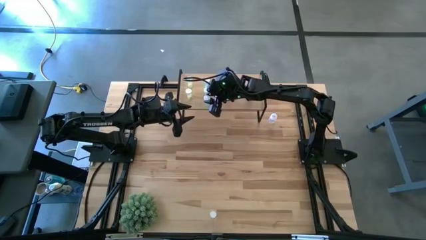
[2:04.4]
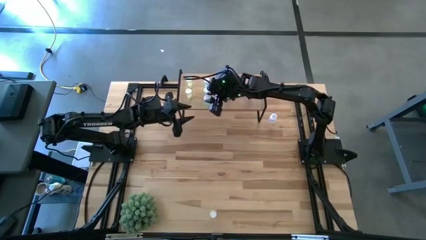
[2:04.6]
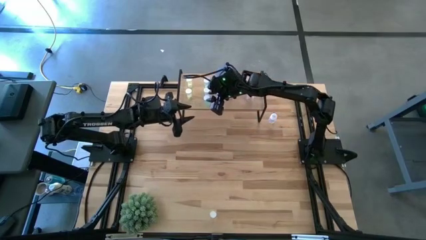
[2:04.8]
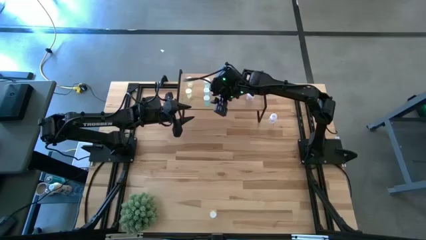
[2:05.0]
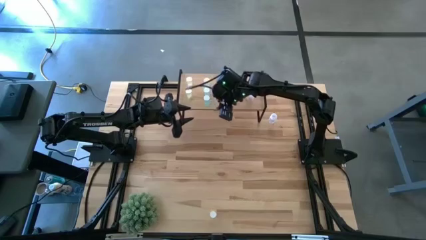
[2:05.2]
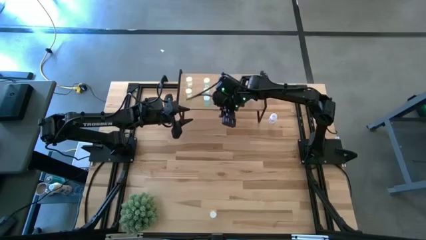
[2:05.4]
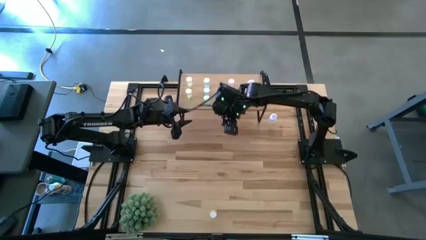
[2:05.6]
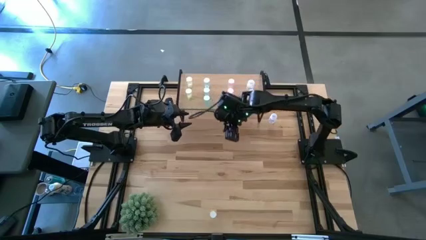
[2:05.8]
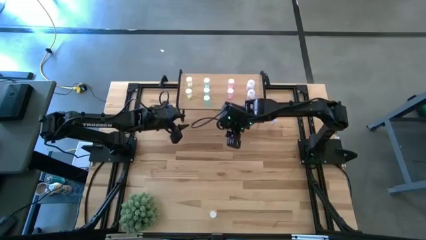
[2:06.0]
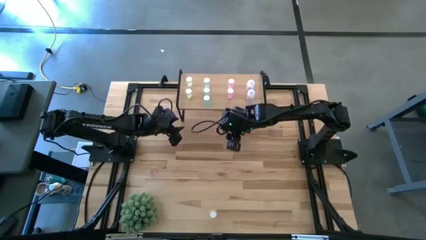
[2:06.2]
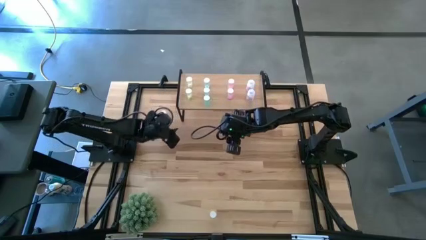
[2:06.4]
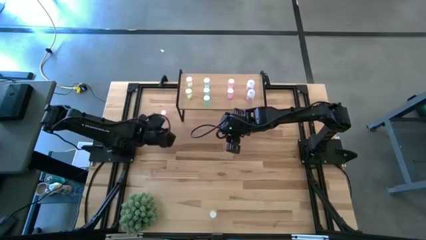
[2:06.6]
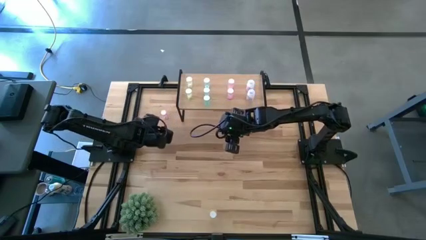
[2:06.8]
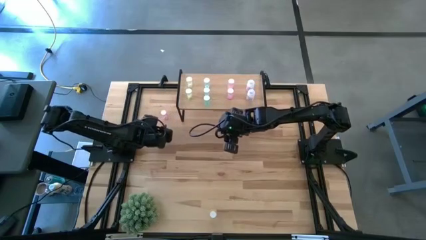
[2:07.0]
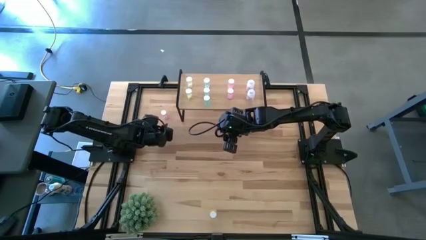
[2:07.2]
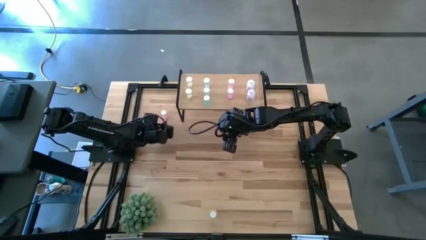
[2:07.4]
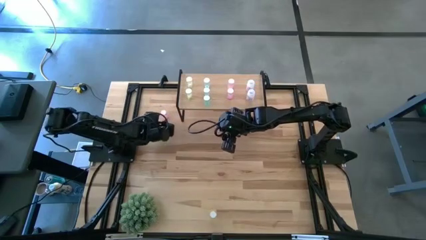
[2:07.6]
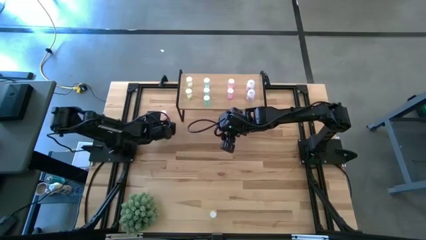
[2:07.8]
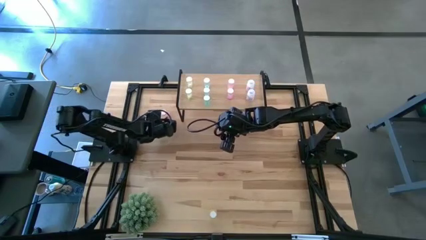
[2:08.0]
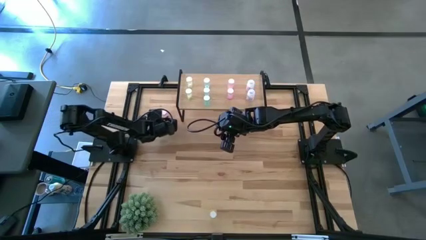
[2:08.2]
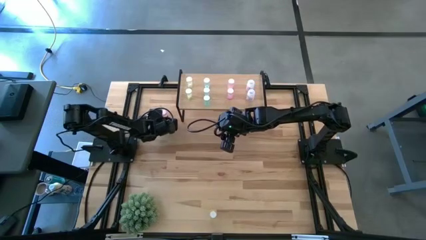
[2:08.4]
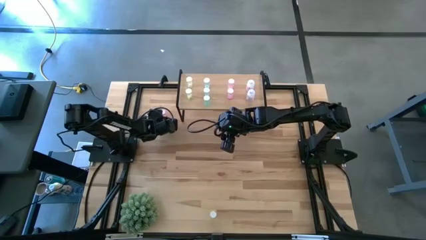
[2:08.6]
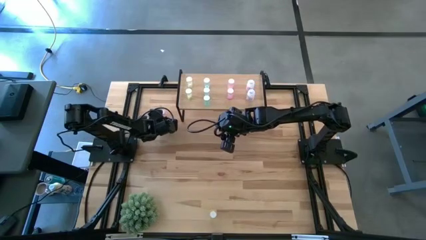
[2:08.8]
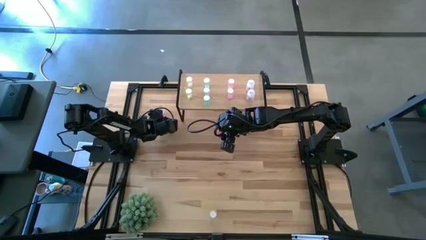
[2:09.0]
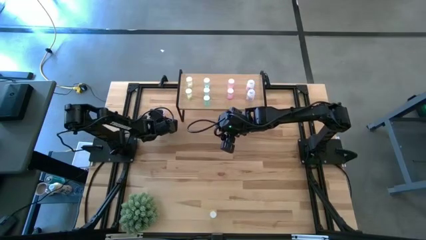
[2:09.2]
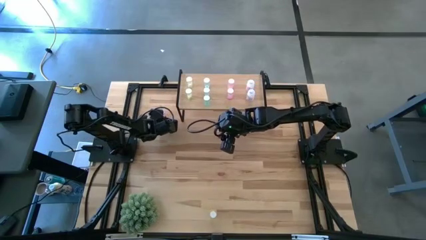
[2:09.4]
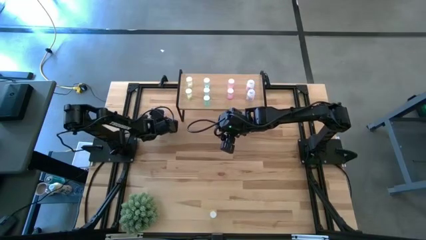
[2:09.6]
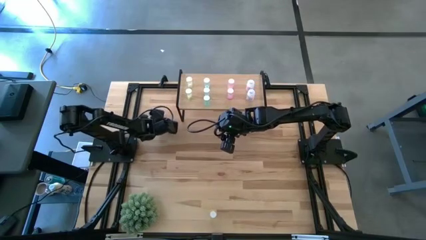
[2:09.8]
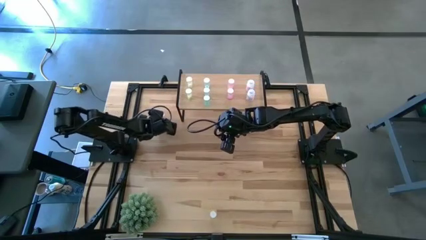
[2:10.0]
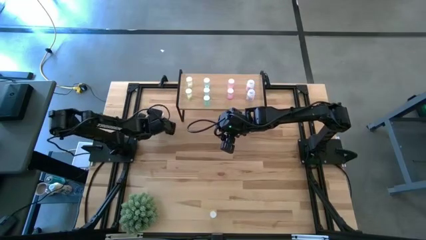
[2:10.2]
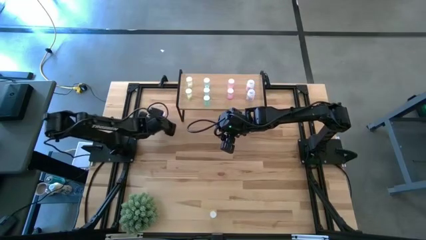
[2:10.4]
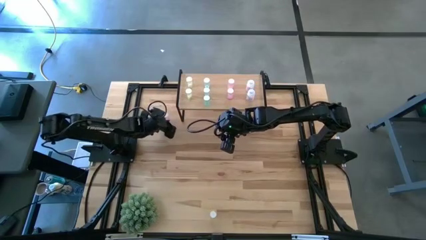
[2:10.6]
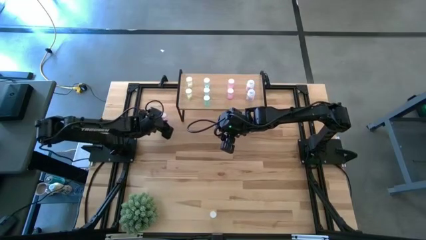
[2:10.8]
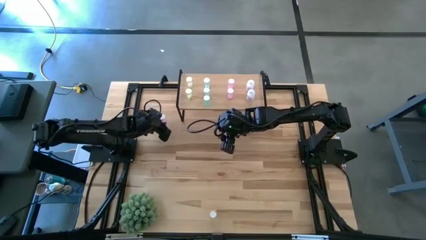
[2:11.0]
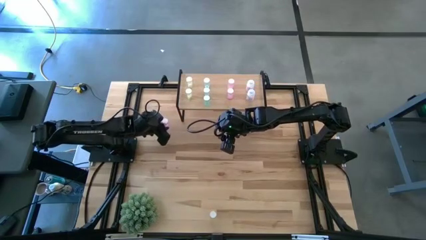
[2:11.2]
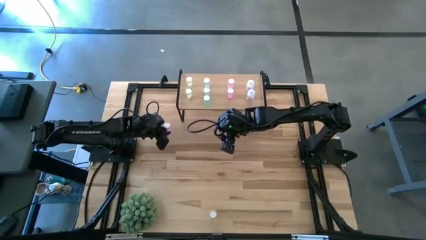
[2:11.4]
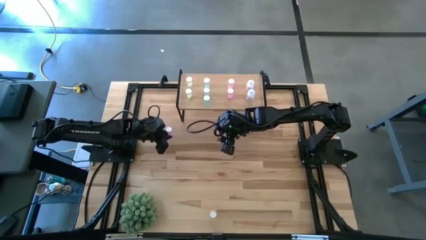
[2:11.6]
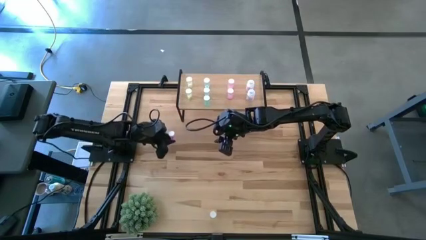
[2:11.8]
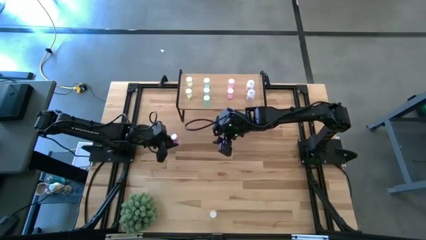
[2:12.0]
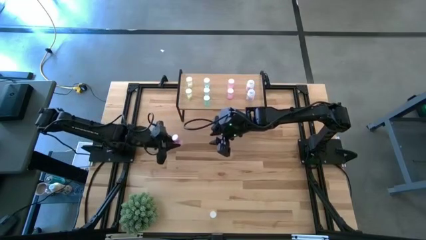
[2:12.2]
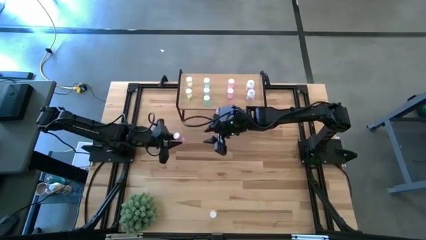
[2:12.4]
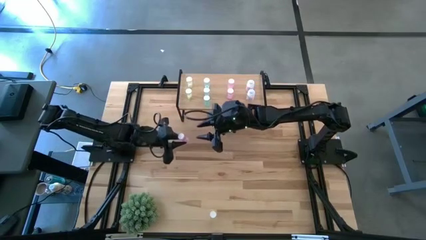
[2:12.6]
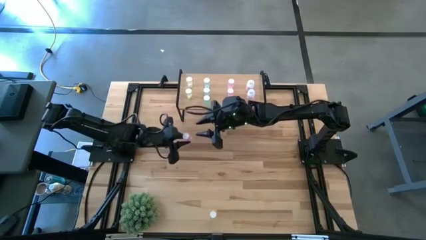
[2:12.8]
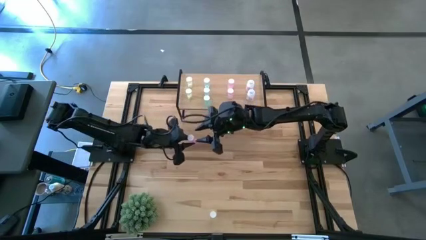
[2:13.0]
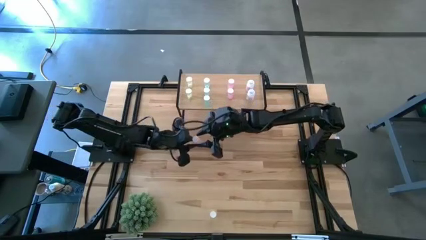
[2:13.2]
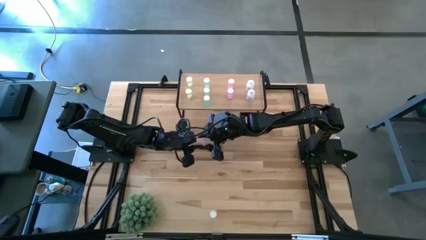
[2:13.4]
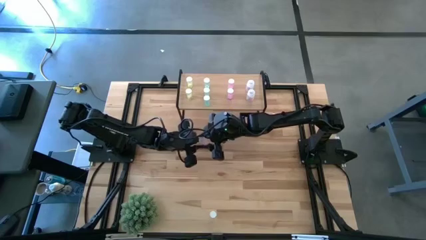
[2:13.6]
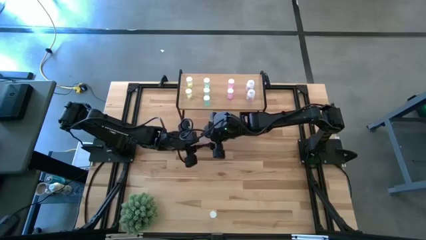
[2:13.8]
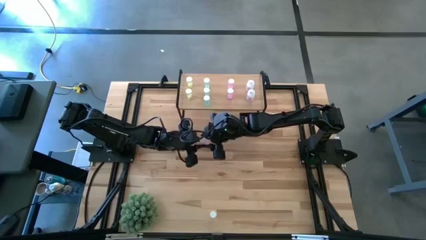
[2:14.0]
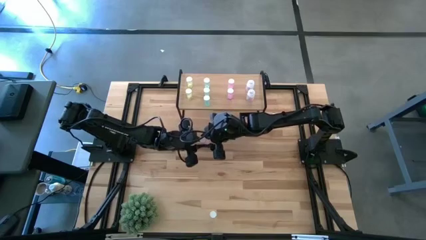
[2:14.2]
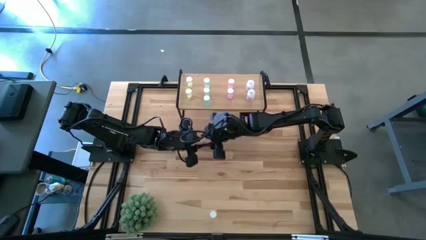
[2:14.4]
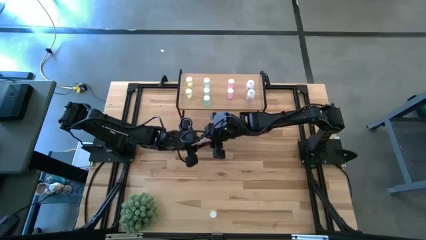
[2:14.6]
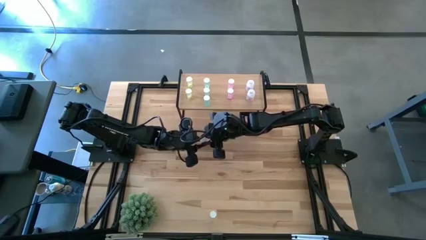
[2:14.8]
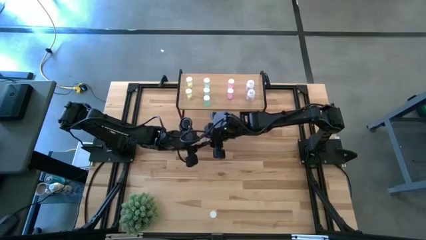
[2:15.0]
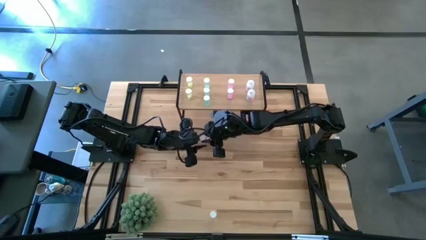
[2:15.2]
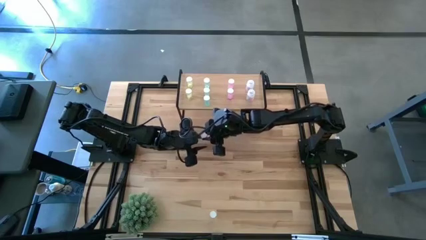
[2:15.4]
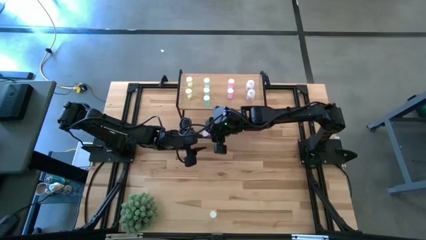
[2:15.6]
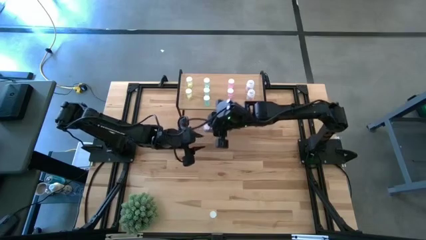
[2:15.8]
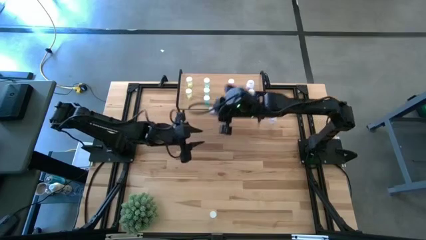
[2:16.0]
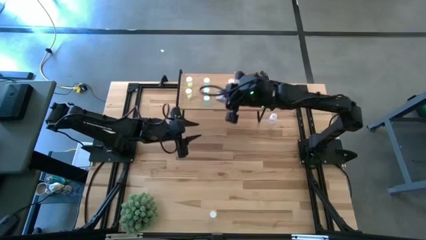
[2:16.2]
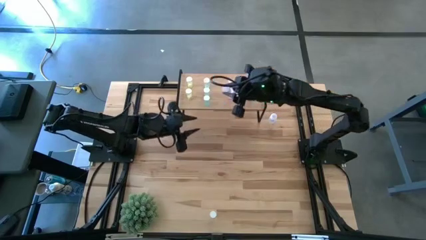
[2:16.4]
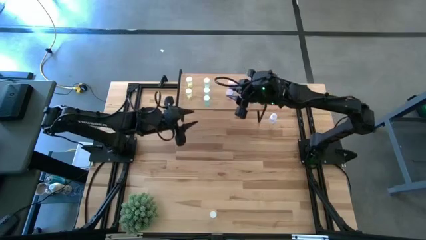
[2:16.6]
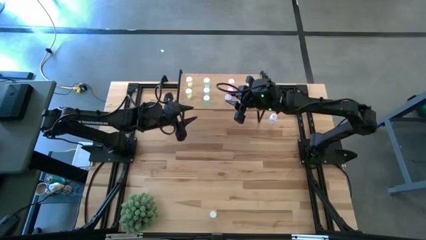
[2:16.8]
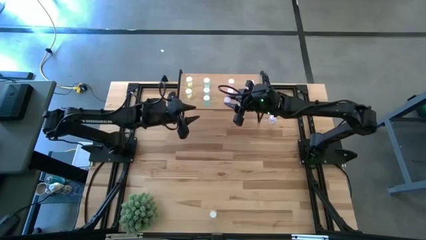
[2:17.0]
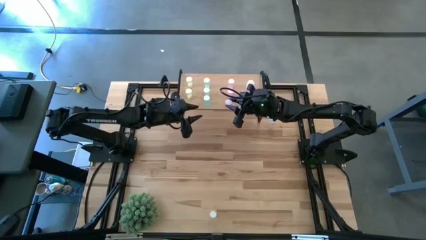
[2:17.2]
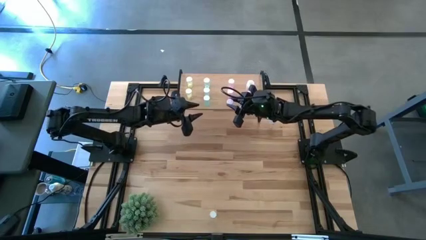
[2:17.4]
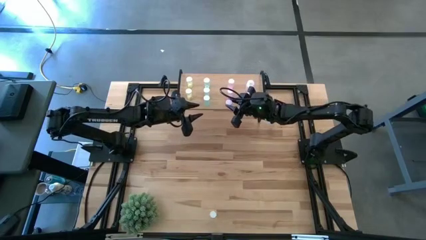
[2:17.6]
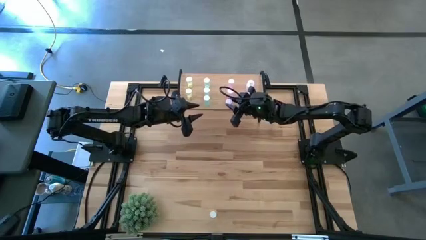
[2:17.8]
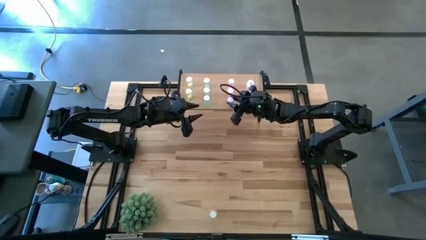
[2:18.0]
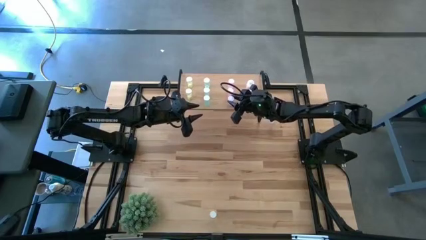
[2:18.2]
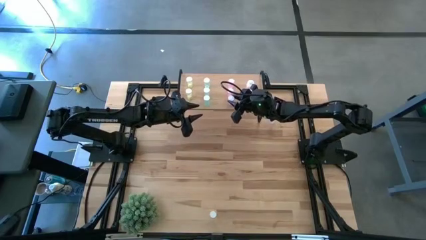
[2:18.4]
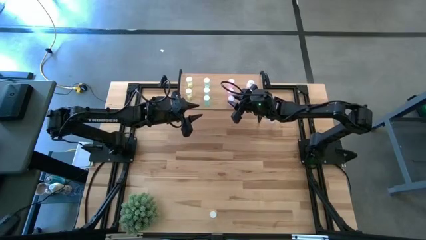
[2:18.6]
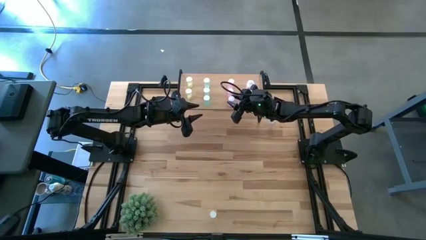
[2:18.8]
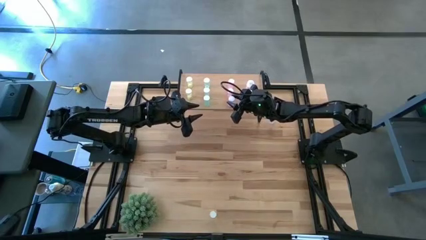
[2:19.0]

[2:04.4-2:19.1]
Task: Pick and place medicine bottles onto shelf by color
Put the pink pill bottle and align it with the other pink pill bottle on the shelf
